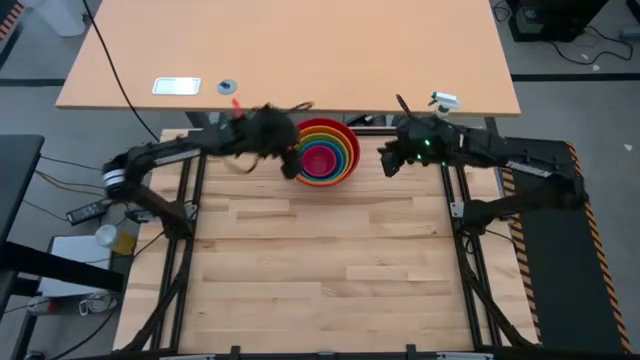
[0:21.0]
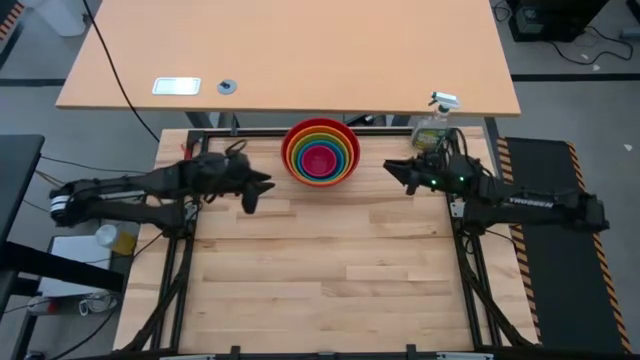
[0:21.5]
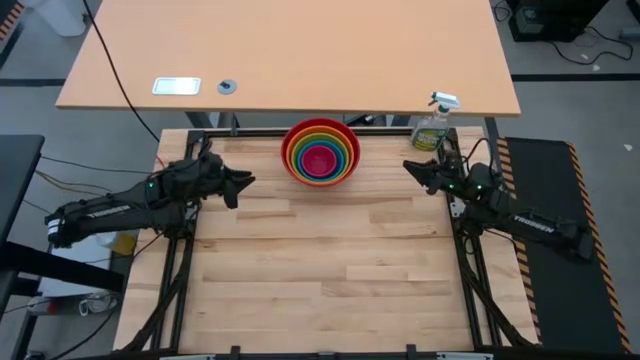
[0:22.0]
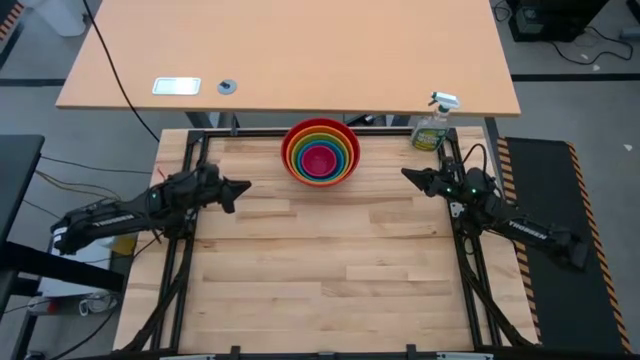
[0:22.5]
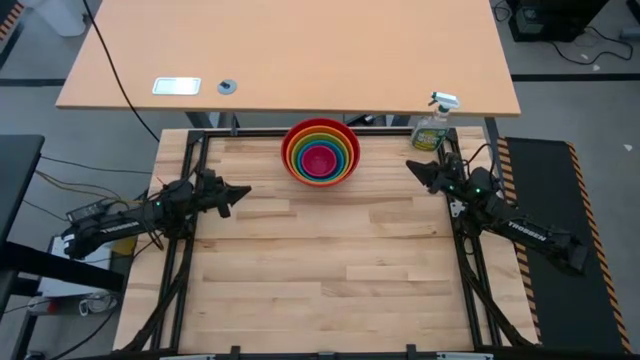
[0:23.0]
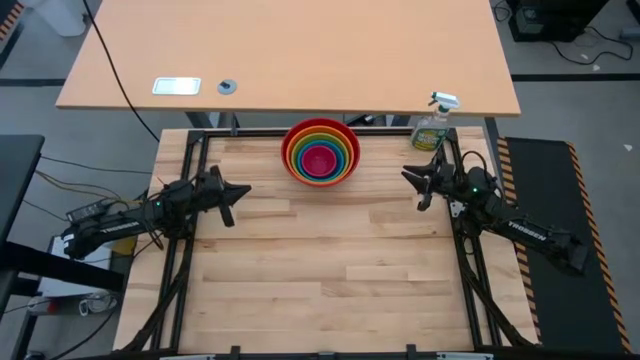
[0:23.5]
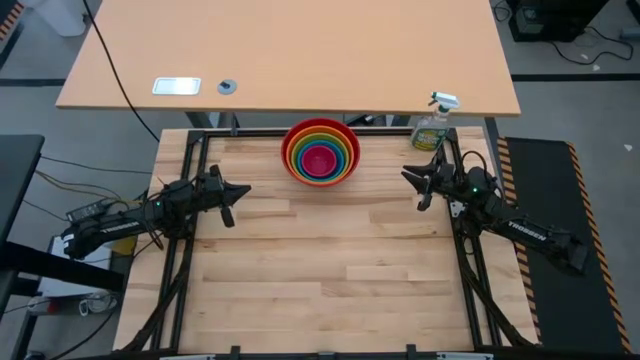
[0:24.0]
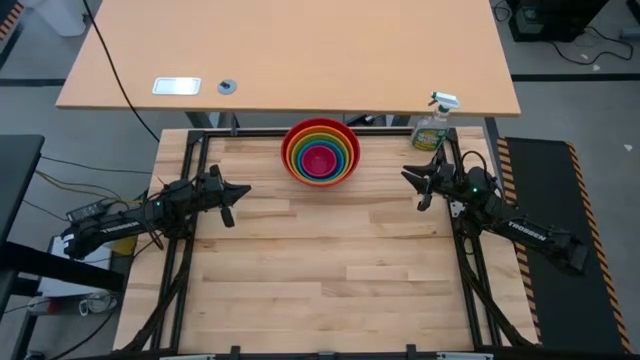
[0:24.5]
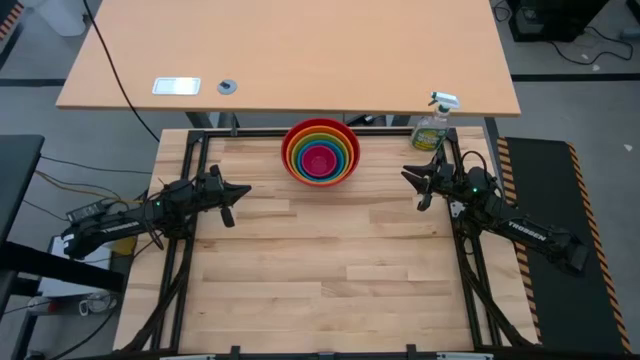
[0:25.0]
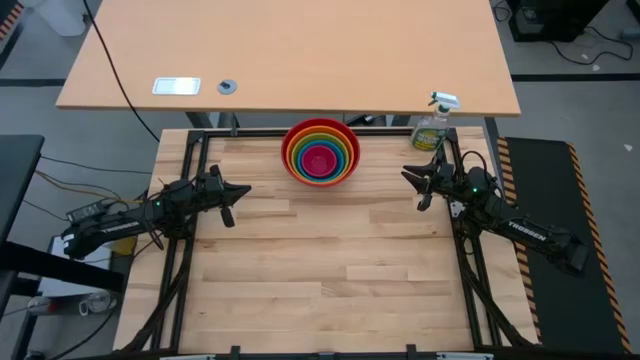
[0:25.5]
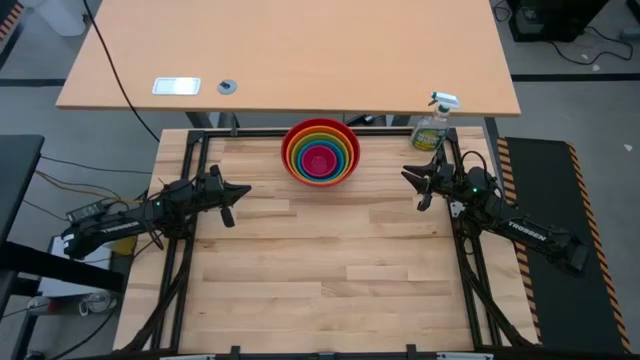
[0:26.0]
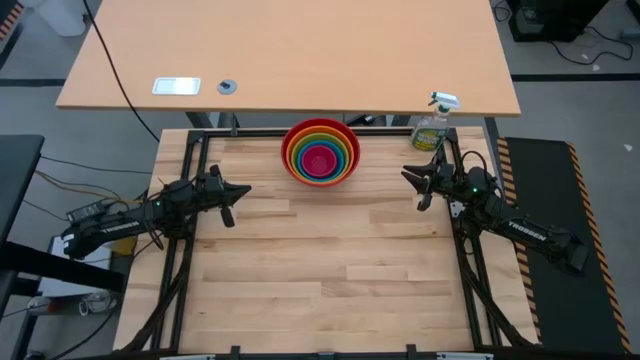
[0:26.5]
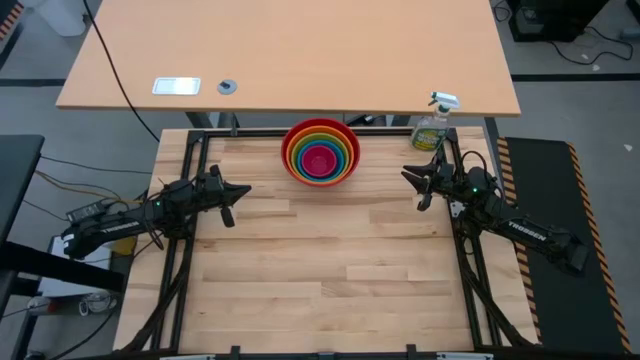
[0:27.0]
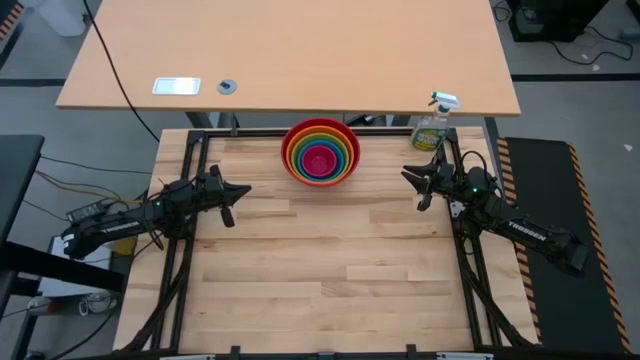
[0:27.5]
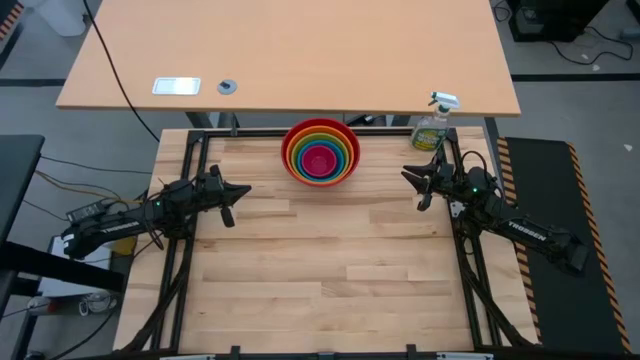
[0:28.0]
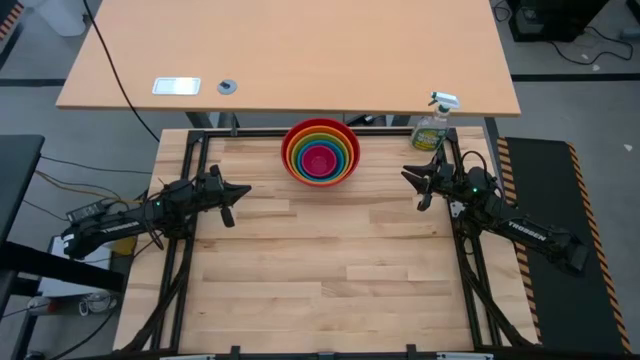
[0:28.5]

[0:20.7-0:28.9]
Return to Home Position
